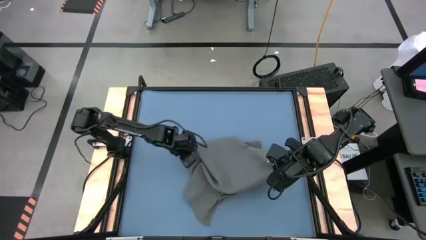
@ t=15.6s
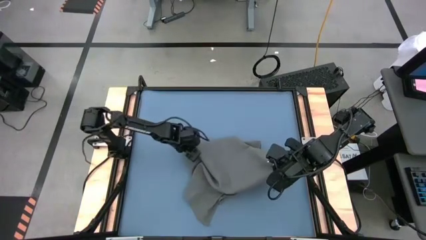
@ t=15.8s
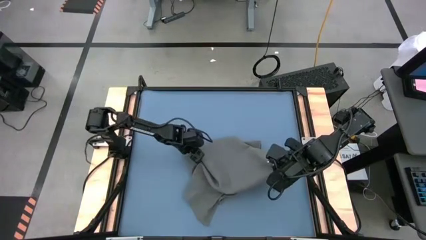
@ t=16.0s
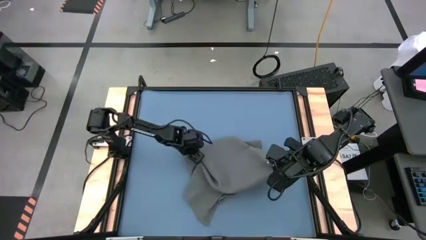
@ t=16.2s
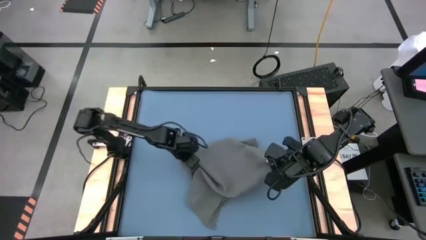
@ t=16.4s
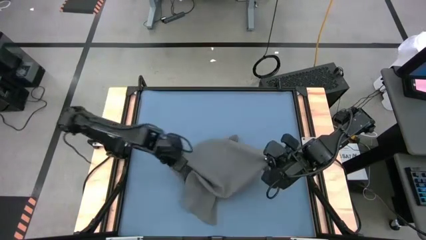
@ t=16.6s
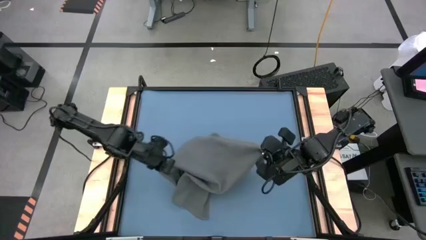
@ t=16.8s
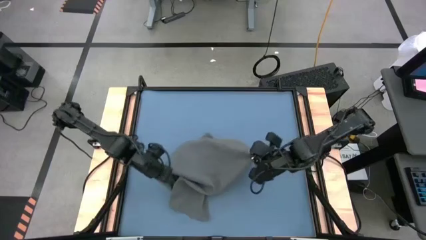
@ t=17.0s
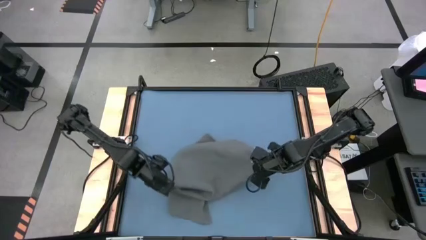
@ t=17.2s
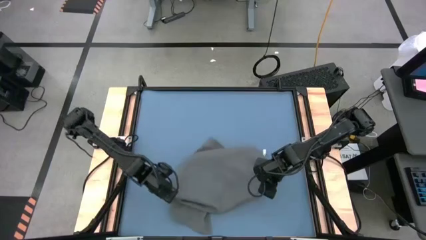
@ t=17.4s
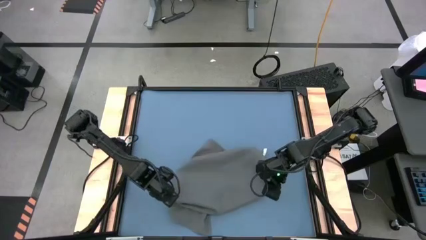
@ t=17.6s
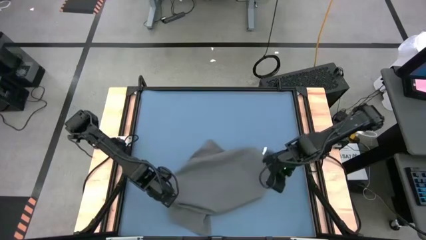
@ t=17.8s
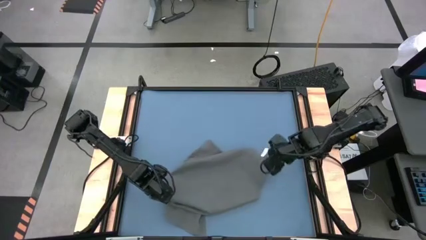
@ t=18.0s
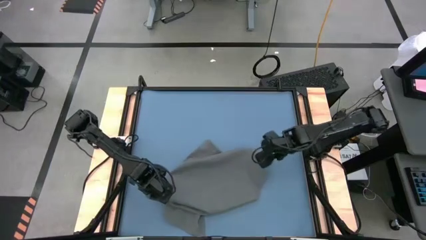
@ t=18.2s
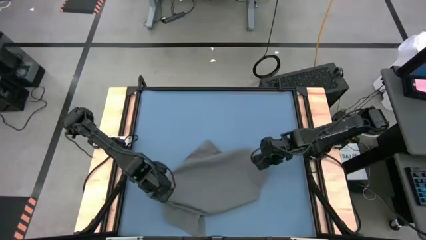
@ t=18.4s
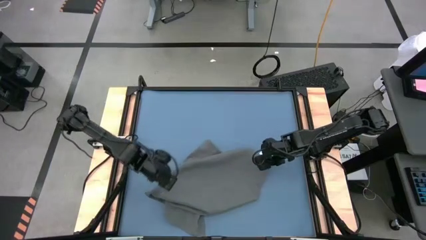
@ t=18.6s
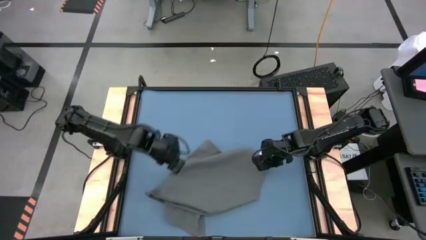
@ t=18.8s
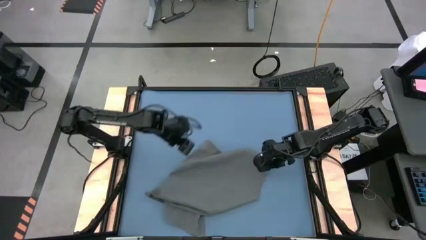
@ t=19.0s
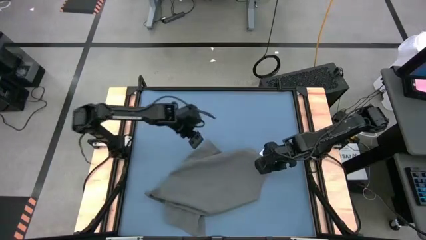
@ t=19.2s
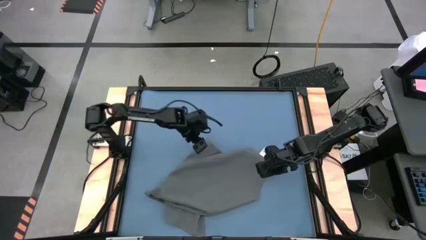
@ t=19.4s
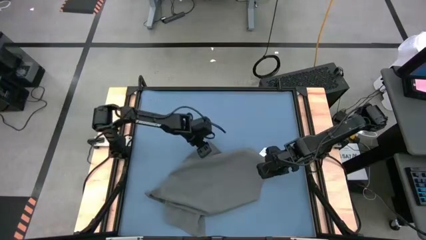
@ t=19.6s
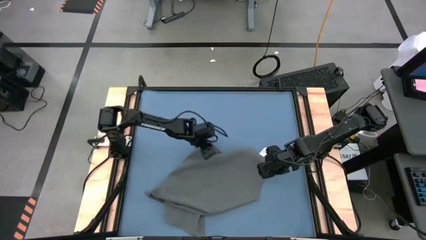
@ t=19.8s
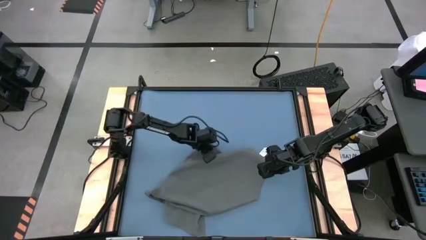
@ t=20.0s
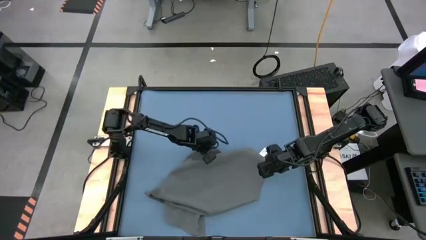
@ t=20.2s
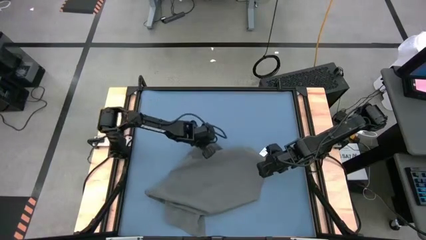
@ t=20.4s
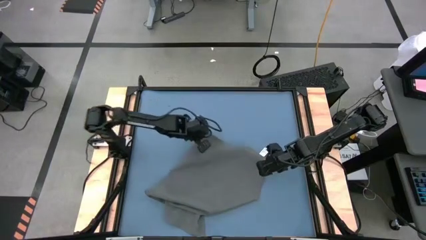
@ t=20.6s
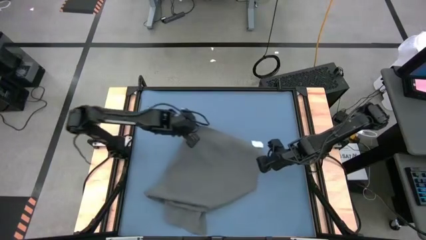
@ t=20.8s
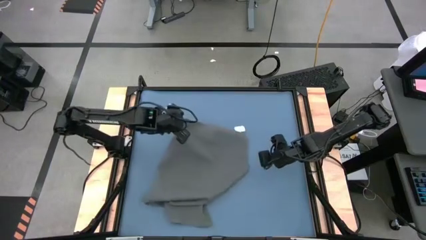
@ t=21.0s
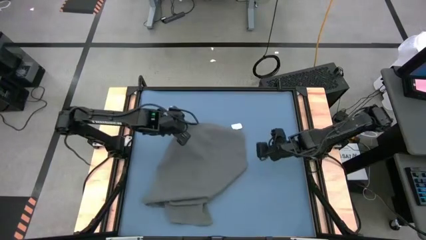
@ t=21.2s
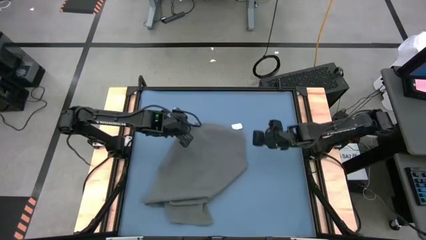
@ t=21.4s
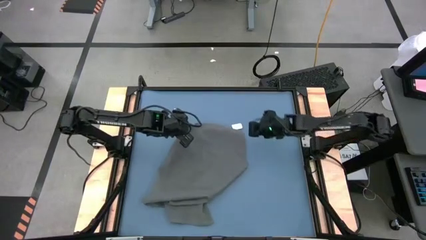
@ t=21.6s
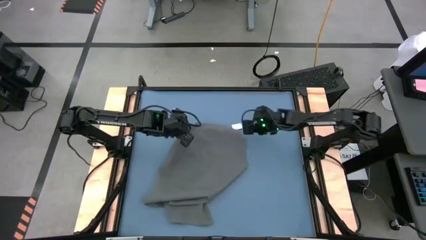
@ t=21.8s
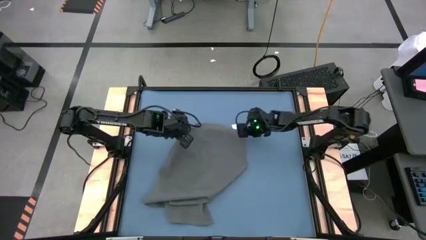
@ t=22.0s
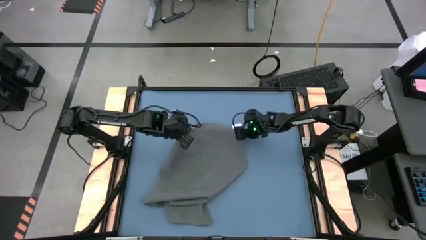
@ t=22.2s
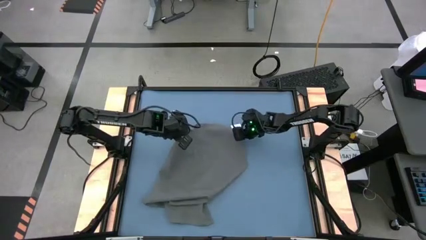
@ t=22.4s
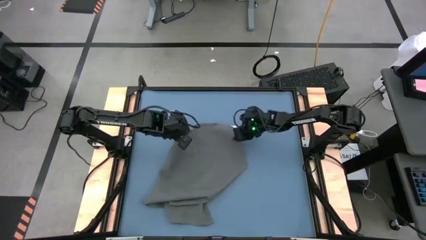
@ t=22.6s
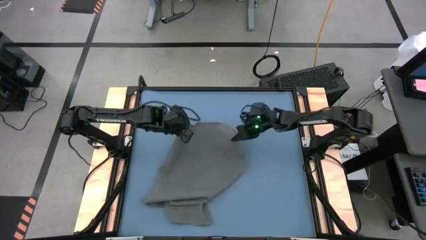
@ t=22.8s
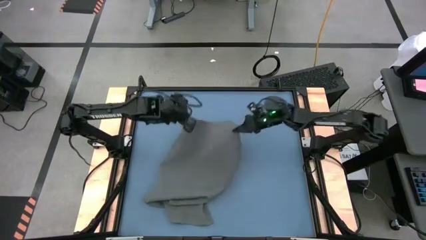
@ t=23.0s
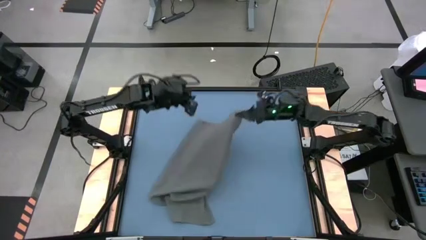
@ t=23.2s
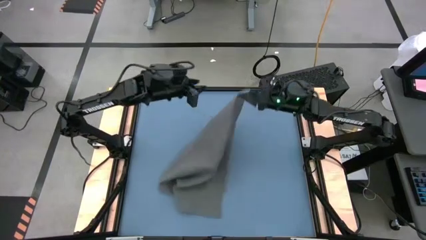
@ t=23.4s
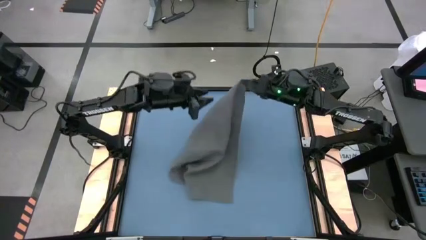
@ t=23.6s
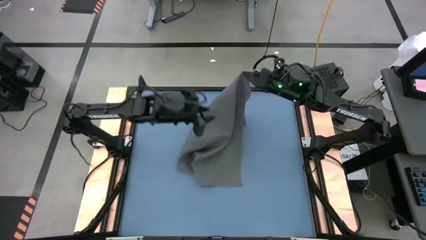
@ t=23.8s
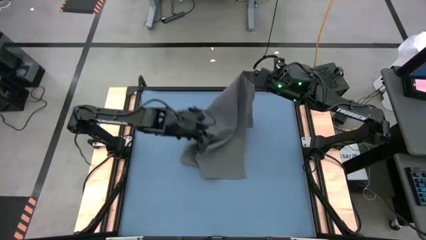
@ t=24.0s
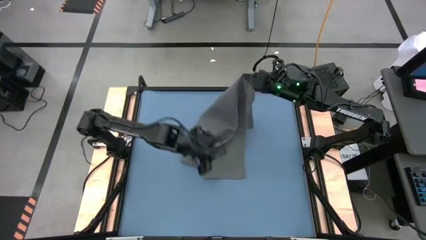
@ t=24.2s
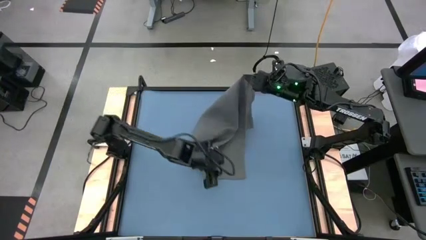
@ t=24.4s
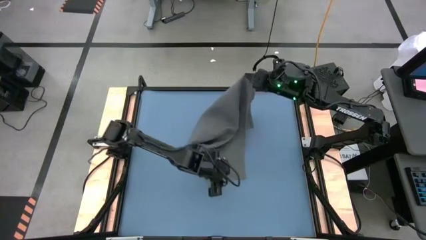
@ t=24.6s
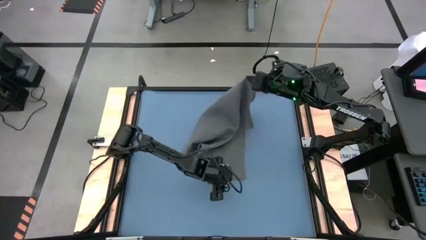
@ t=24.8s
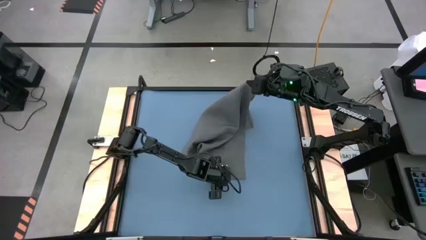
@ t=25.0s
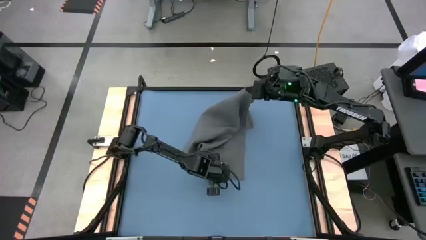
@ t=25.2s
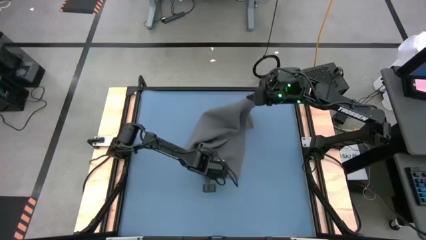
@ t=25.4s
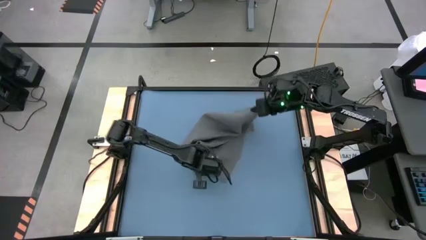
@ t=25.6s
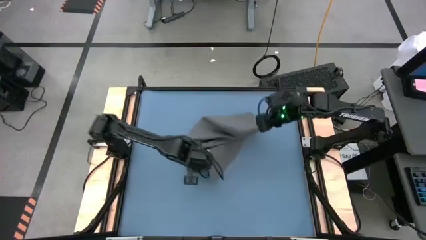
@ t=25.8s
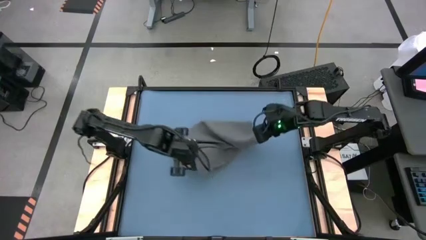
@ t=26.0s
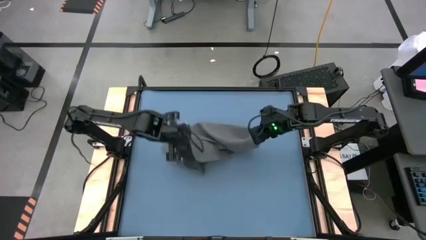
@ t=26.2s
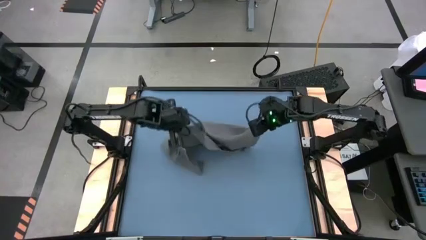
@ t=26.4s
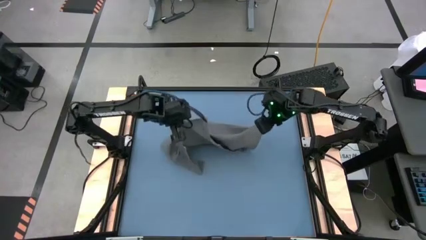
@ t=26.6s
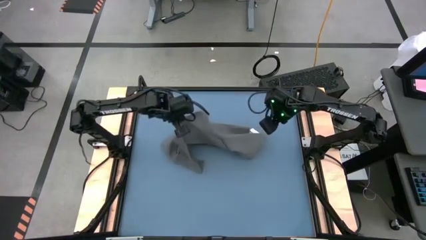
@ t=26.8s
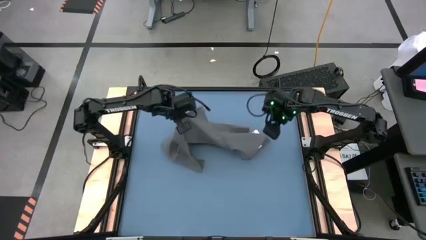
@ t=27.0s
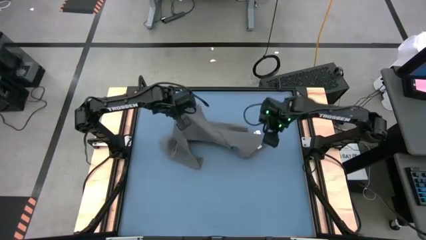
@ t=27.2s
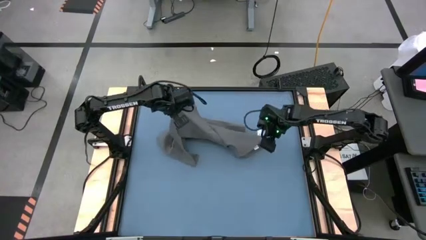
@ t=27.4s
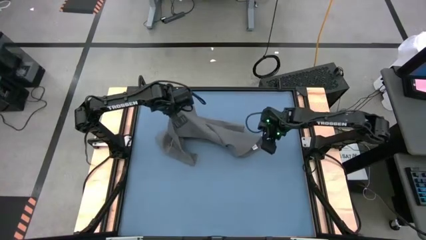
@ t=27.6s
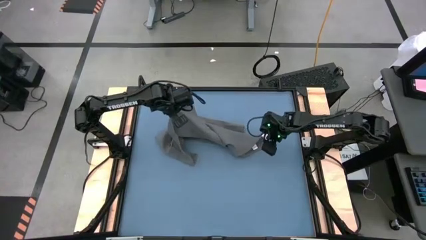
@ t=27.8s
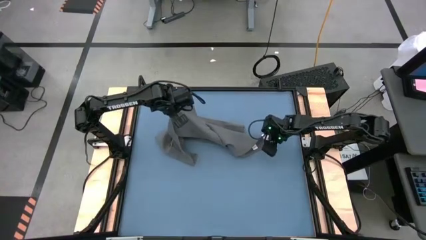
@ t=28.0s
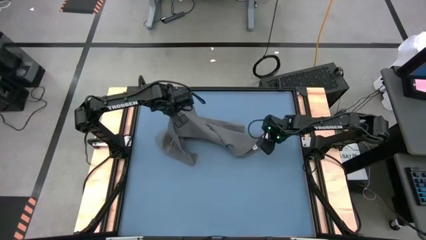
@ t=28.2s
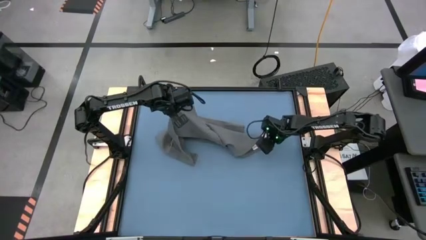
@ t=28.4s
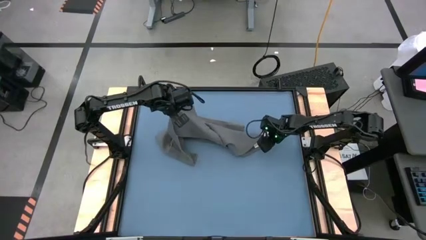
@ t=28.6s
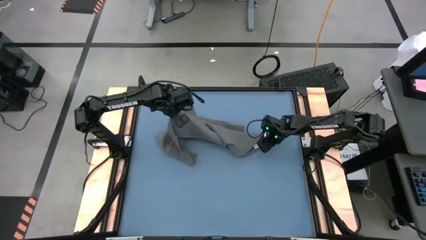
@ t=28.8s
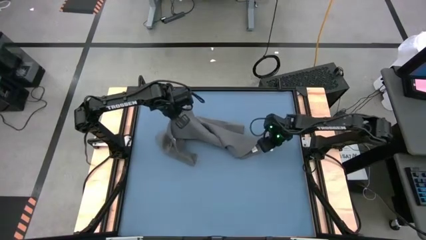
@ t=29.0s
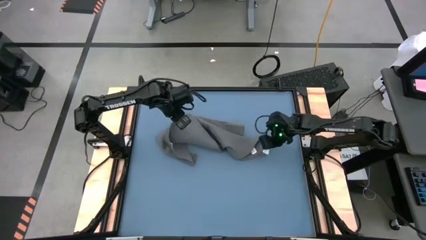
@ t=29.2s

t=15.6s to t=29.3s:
Task: Roll towel
Fold the gray towel

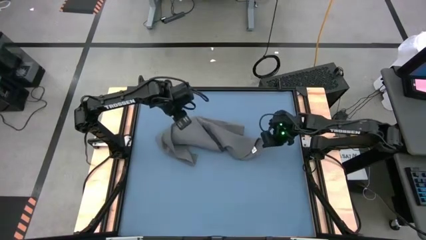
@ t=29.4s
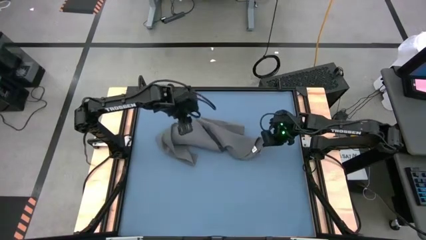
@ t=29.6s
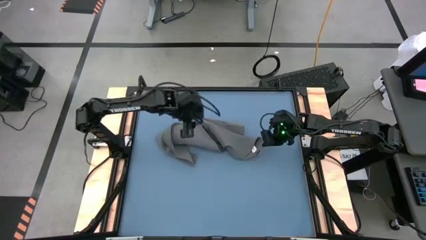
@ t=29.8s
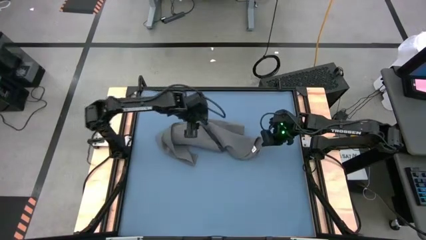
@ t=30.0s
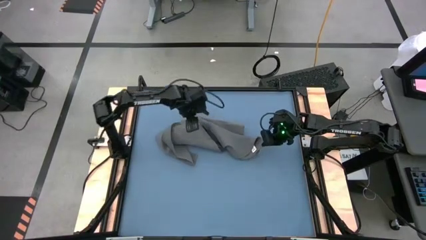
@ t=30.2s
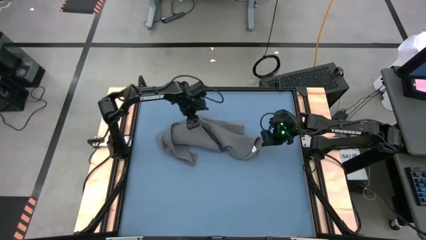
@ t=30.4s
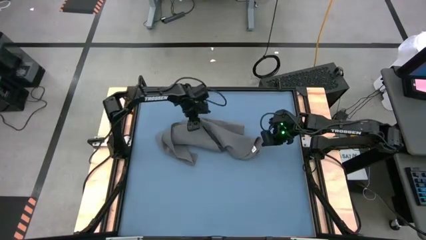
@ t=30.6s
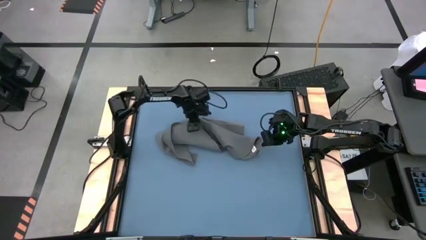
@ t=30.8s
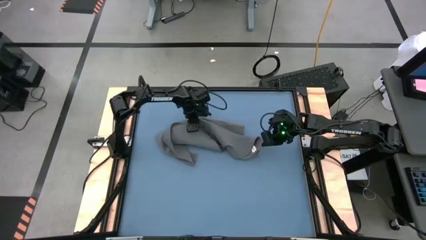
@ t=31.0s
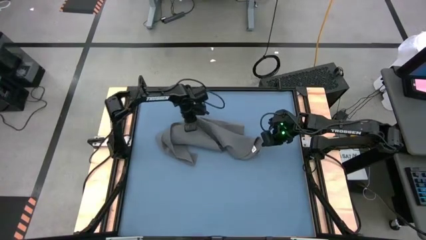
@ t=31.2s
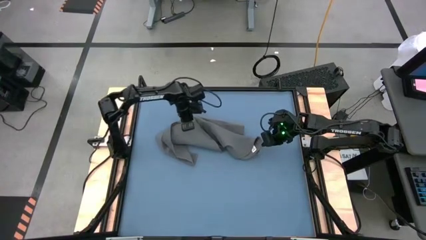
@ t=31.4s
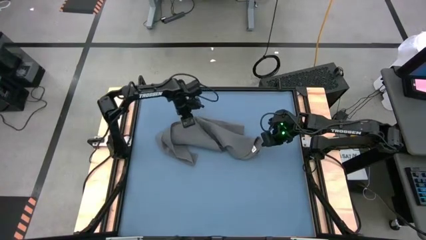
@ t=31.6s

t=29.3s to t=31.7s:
Fold the gray towel
